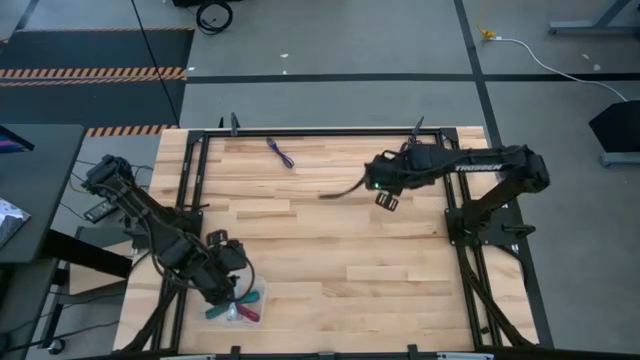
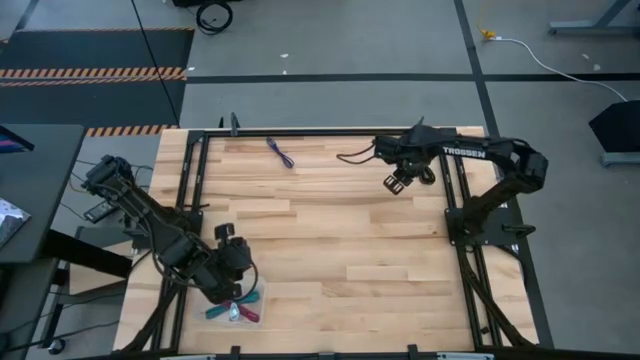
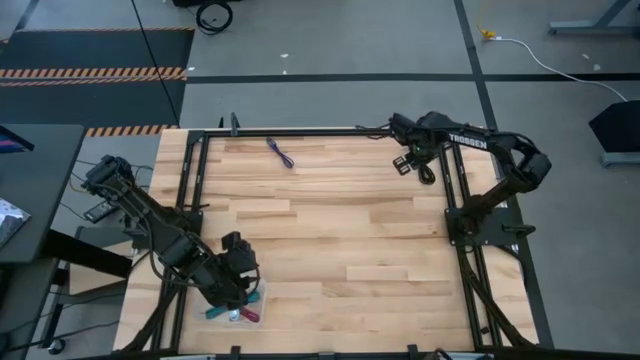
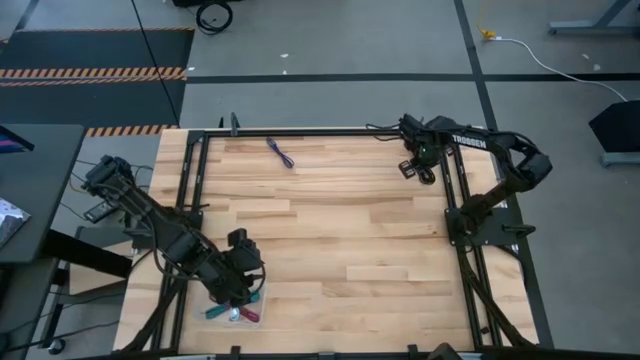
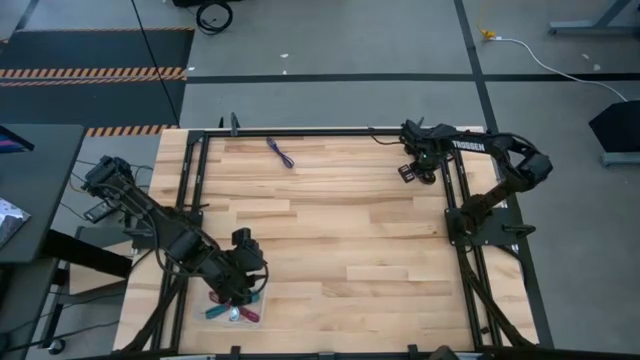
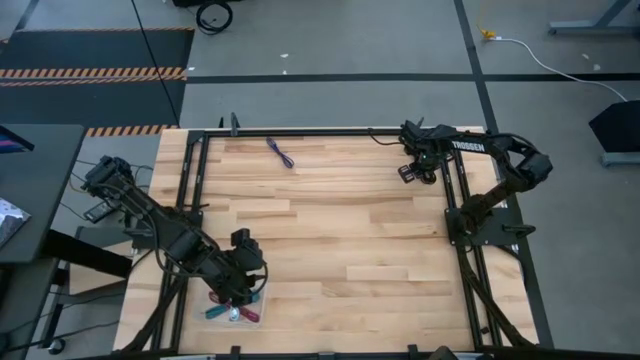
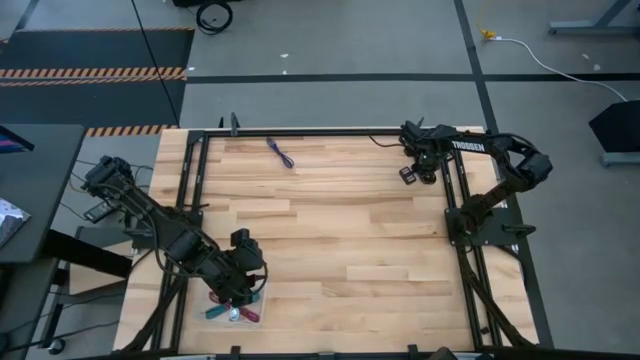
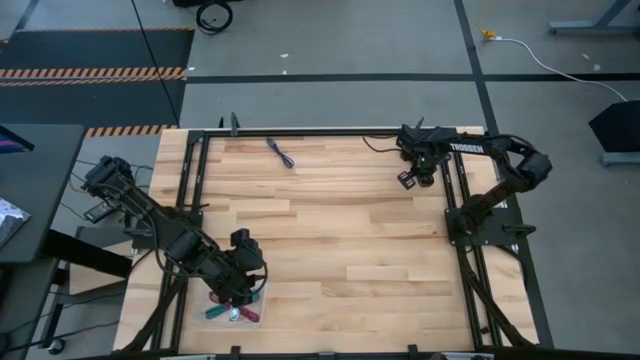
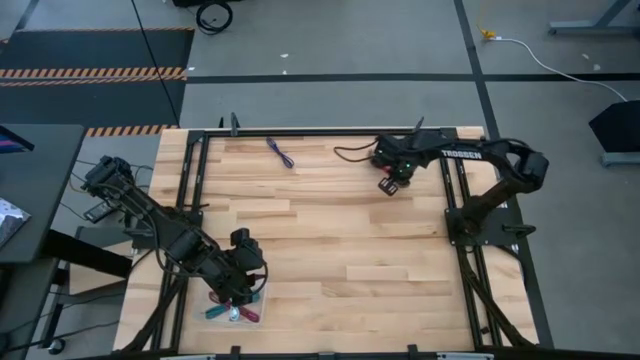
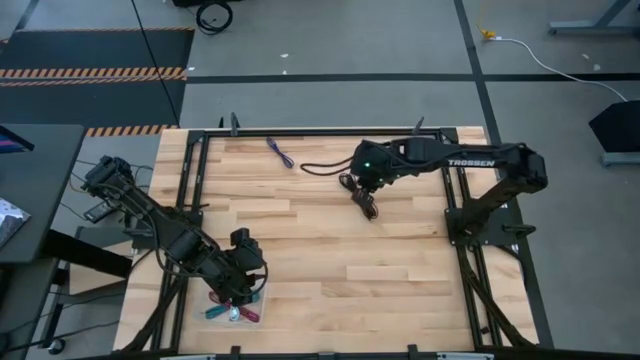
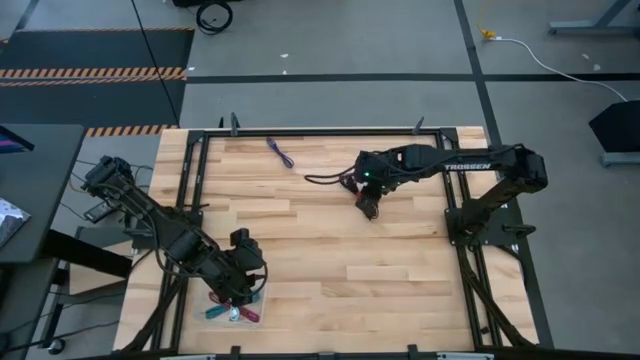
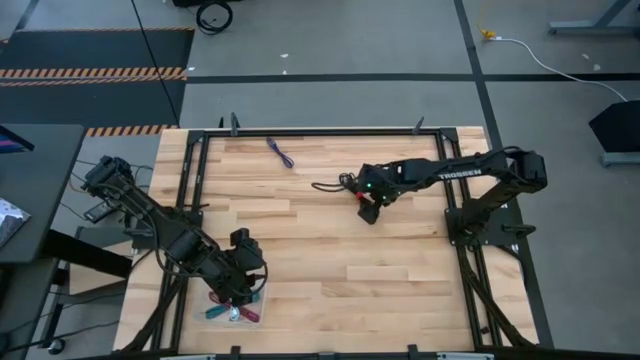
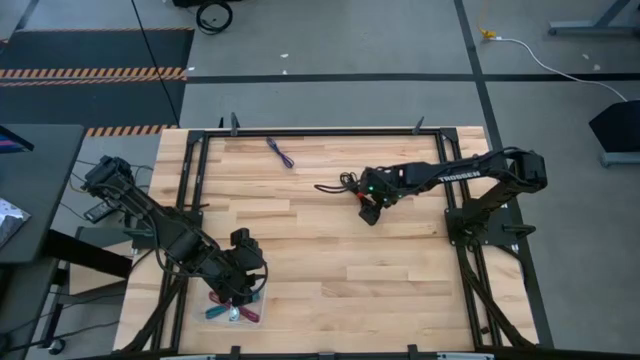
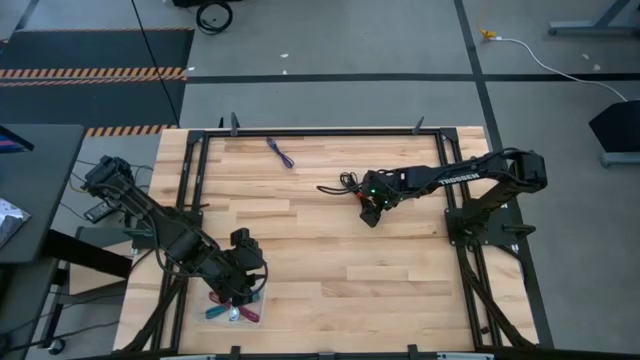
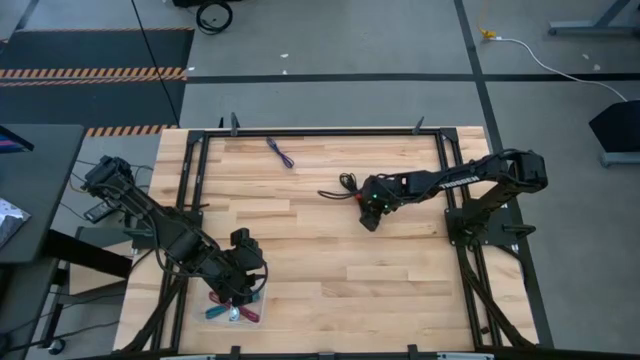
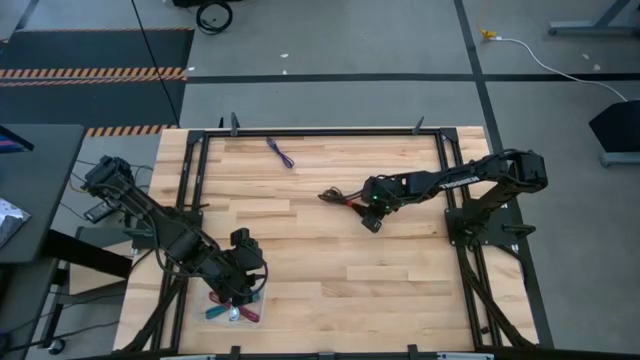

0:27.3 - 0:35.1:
Task: Pick and place USB-C Cables
Put the black charger cable into the transparent bin

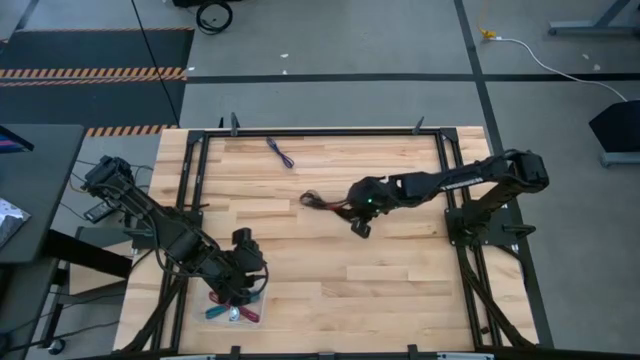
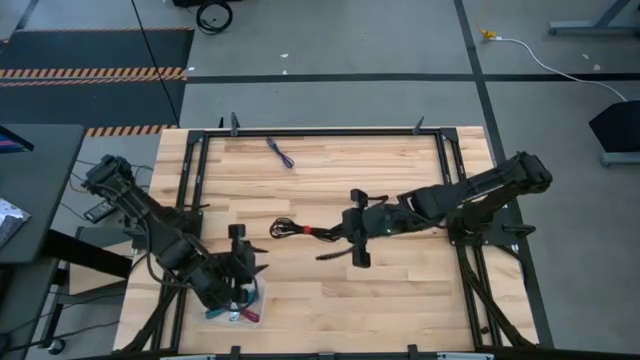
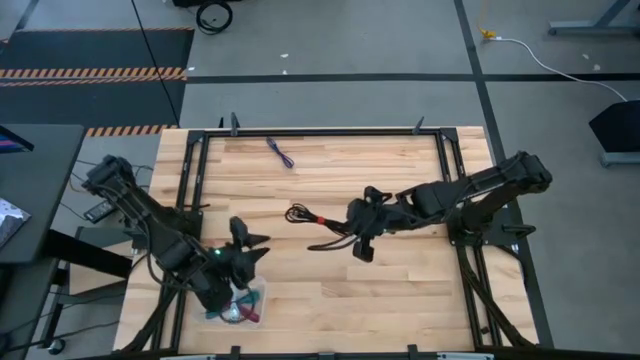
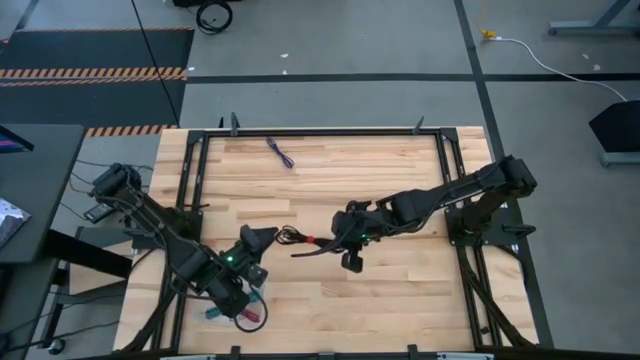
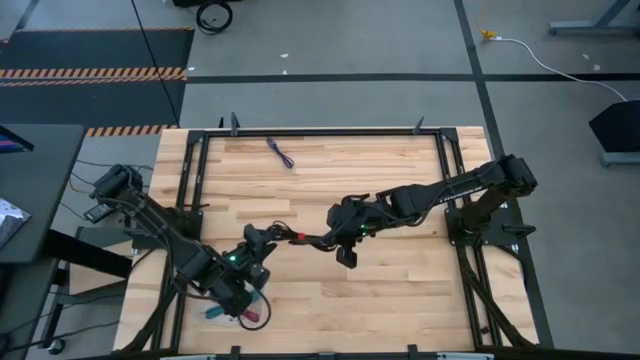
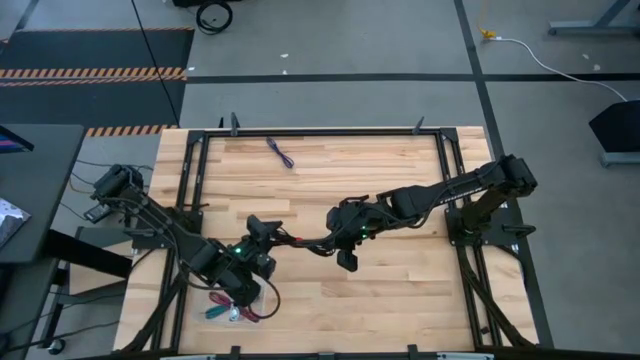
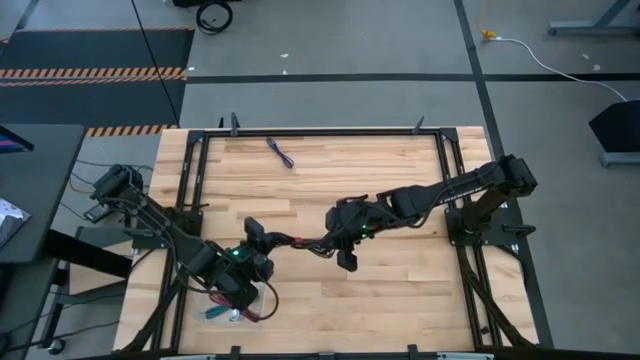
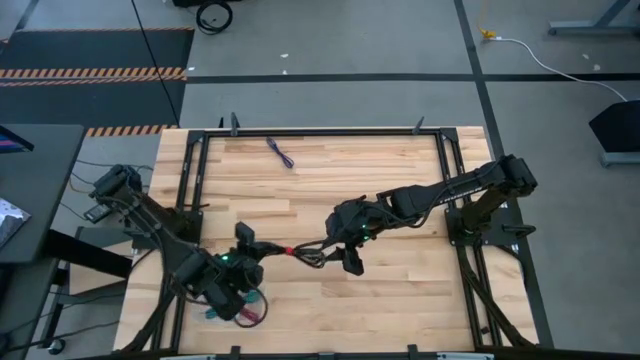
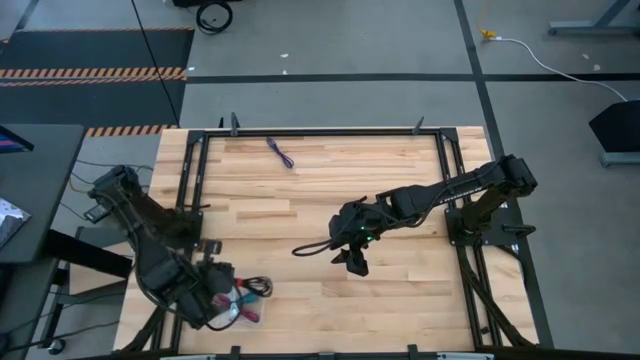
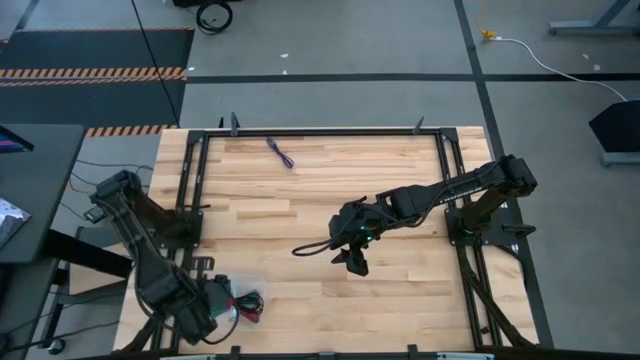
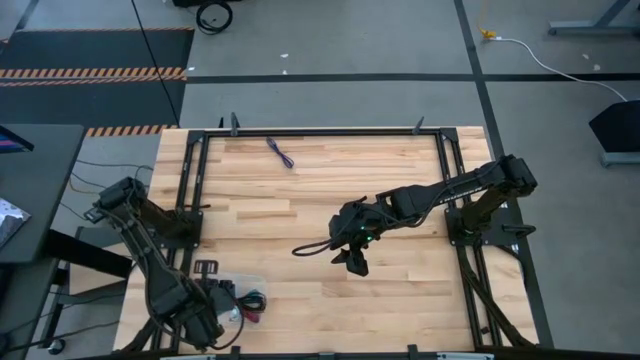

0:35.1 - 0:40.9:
Put the black charger cable into the transparent bin

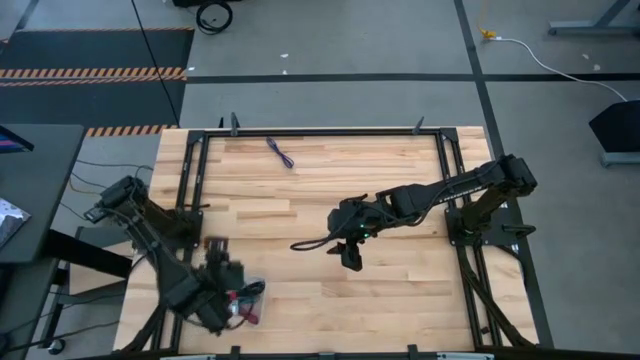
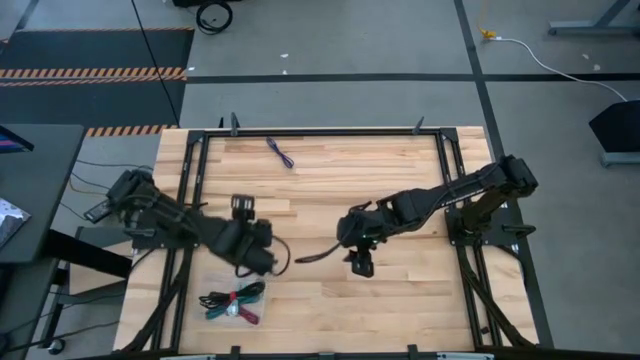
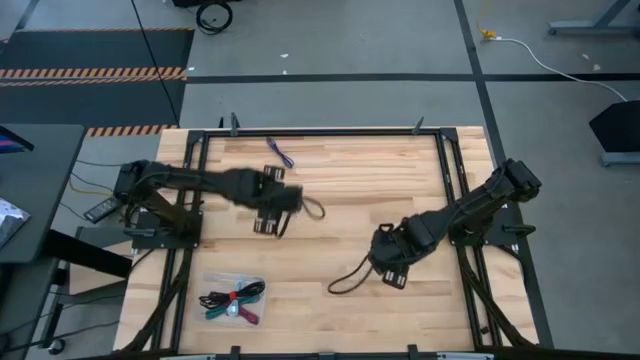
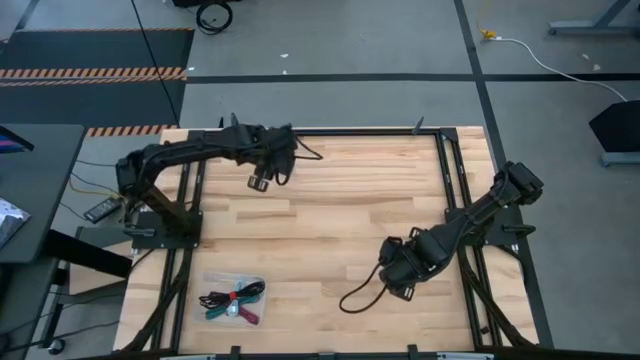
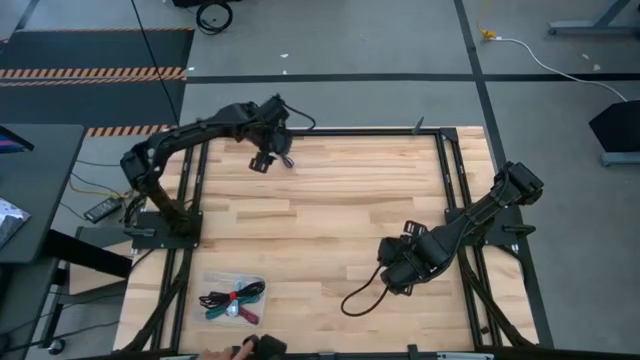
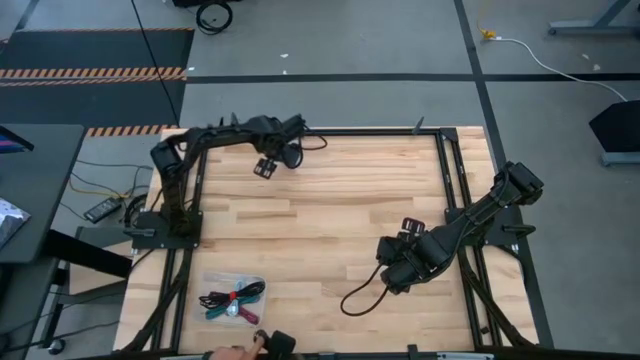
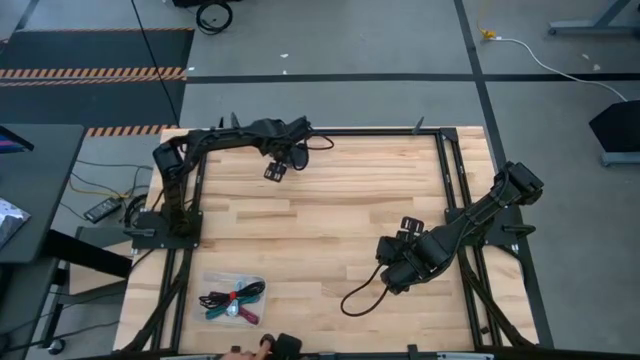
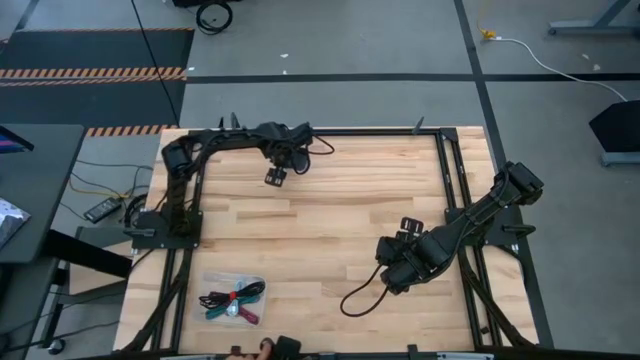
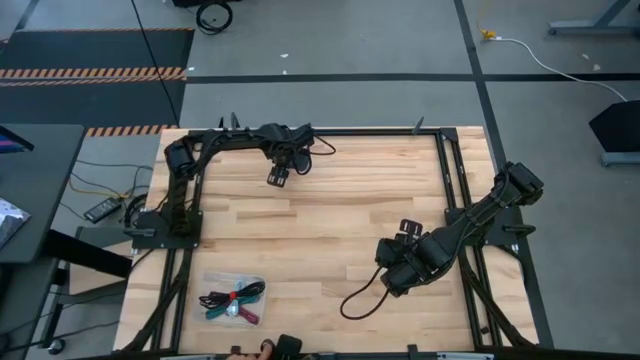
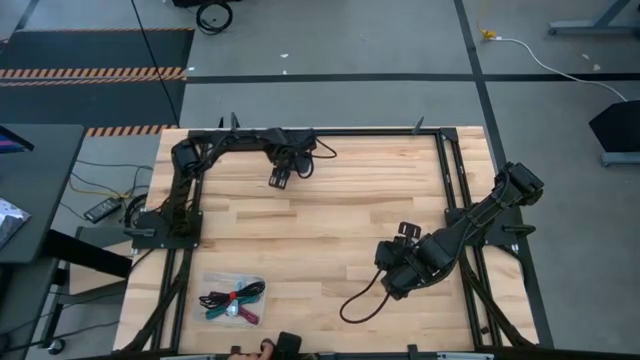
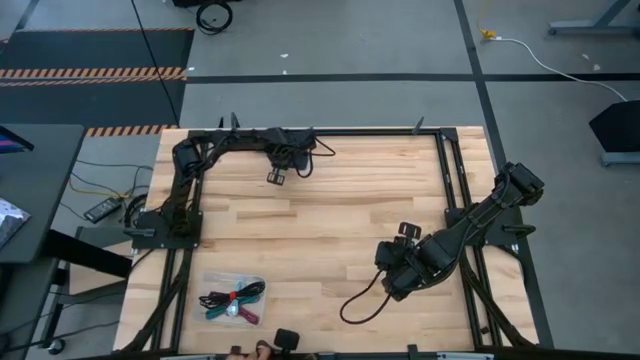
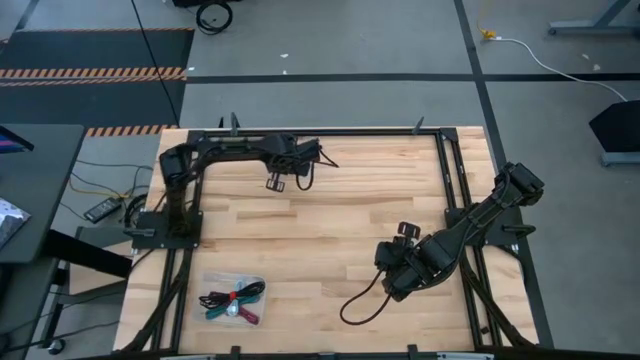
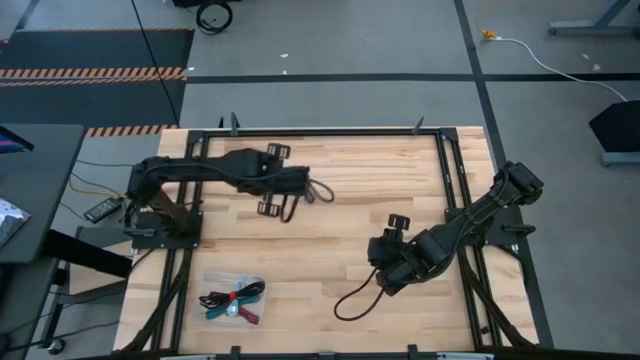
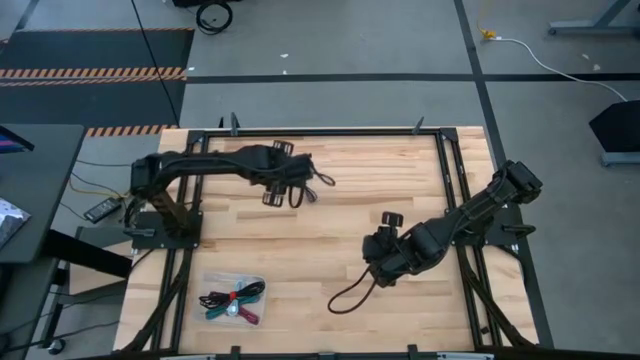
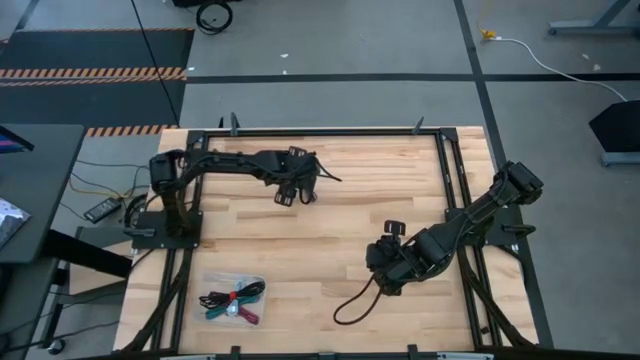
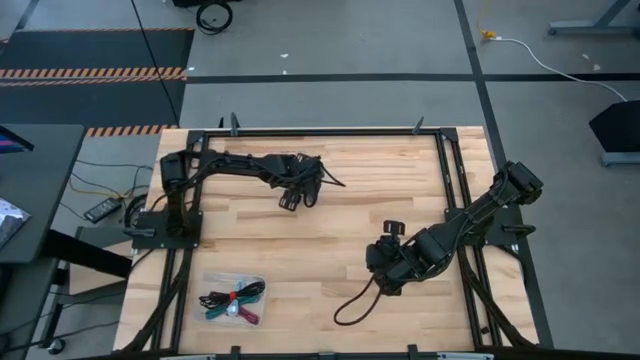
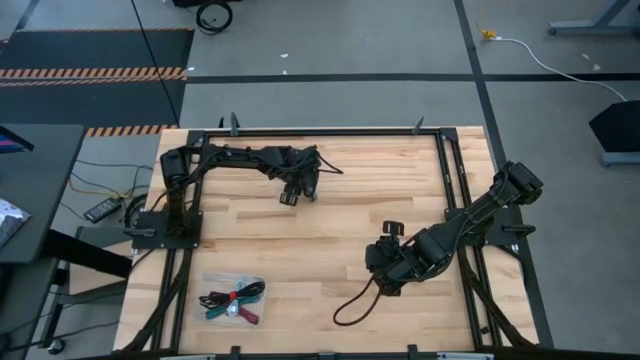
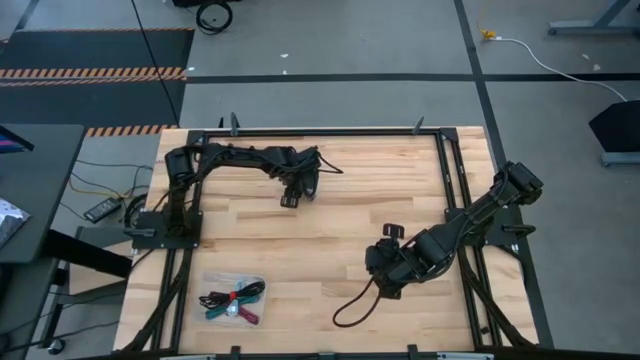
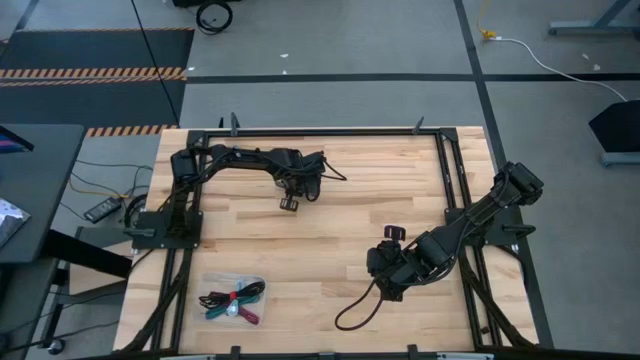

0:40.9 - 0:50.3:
Put the violet charger cable into the transparent bin
